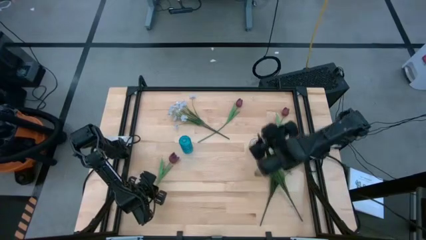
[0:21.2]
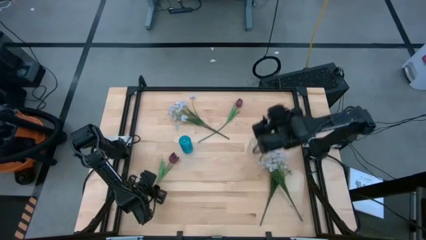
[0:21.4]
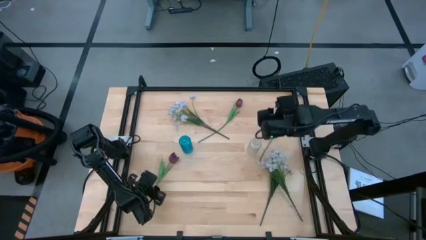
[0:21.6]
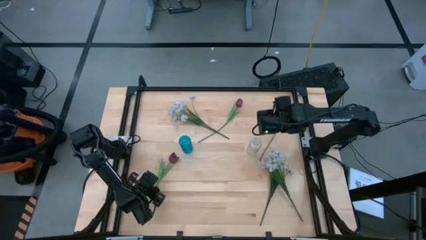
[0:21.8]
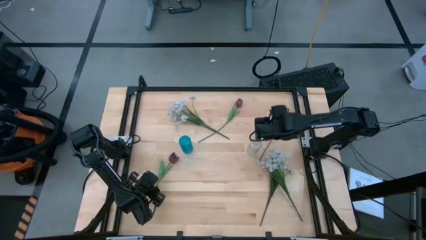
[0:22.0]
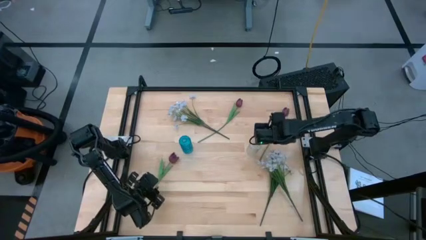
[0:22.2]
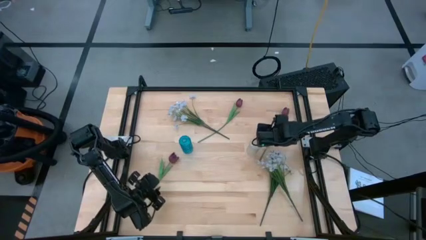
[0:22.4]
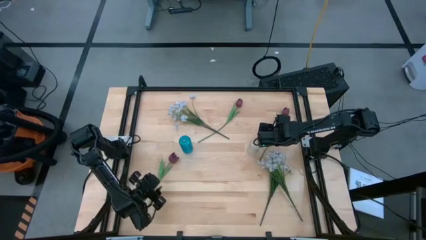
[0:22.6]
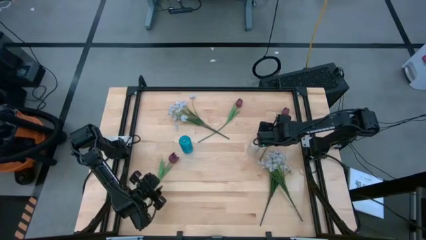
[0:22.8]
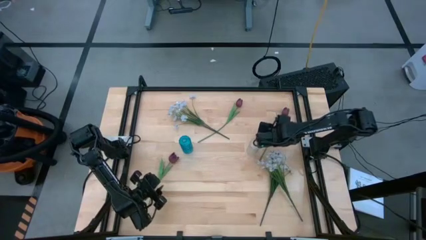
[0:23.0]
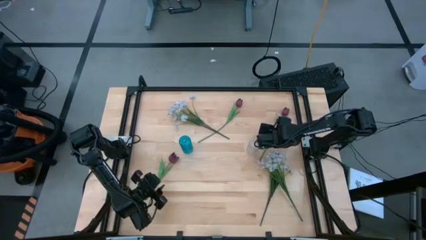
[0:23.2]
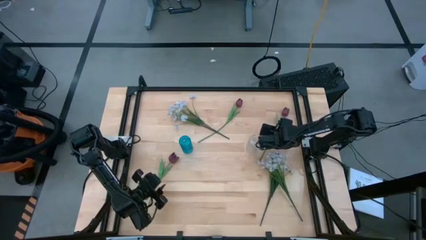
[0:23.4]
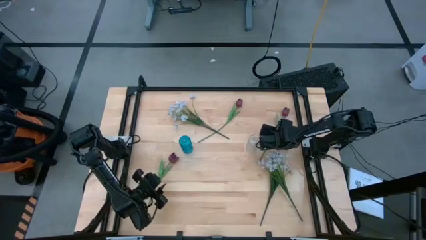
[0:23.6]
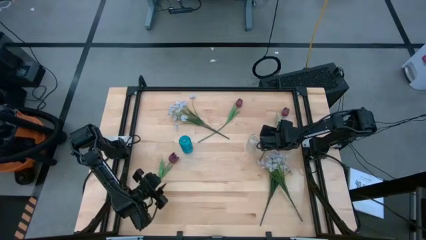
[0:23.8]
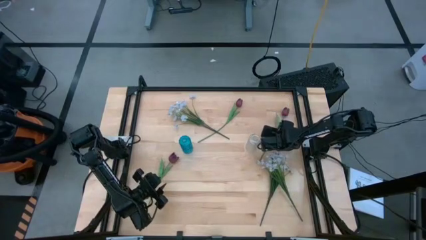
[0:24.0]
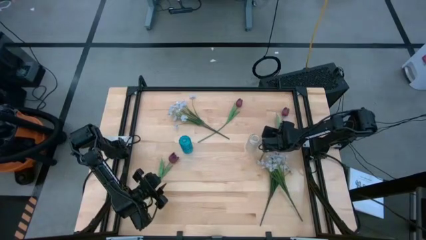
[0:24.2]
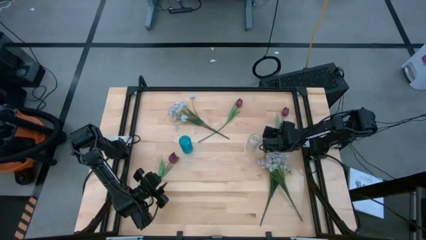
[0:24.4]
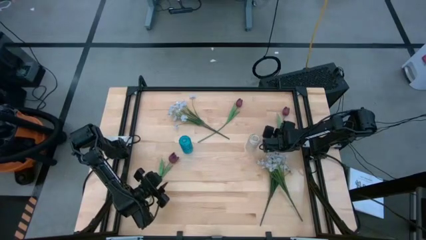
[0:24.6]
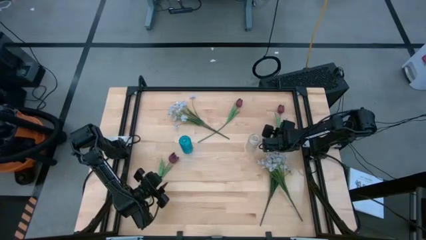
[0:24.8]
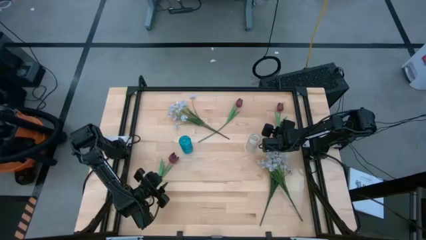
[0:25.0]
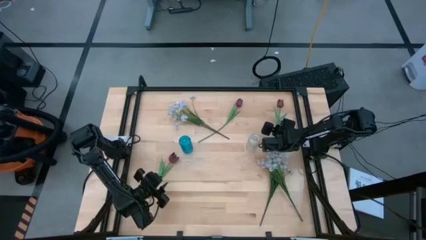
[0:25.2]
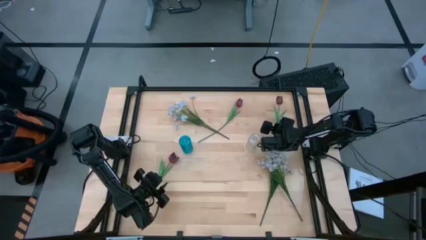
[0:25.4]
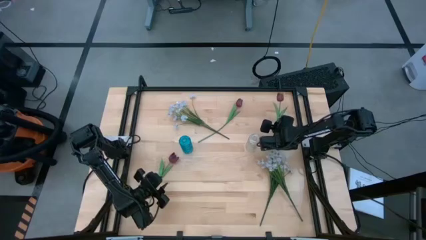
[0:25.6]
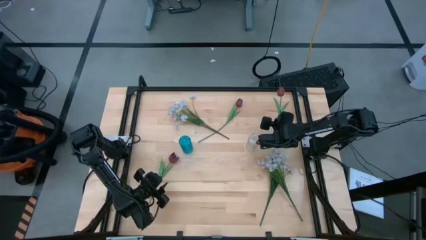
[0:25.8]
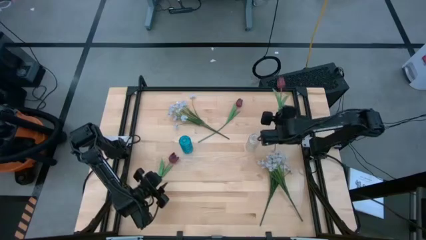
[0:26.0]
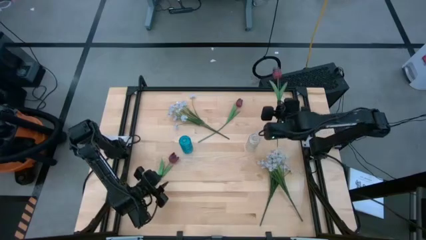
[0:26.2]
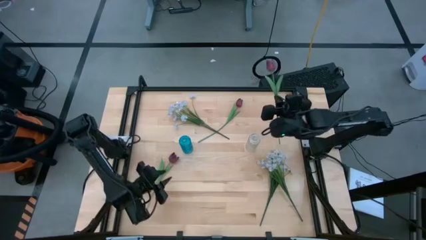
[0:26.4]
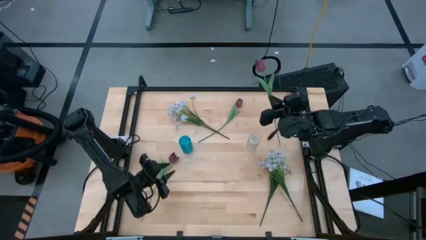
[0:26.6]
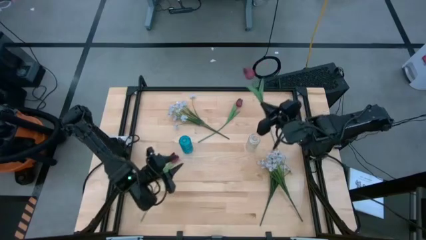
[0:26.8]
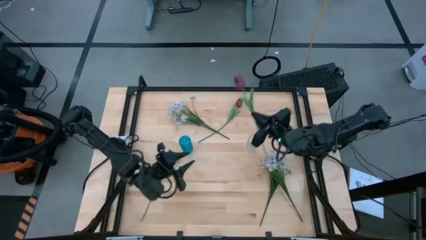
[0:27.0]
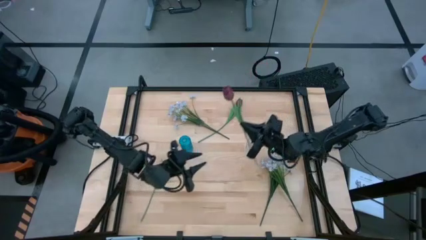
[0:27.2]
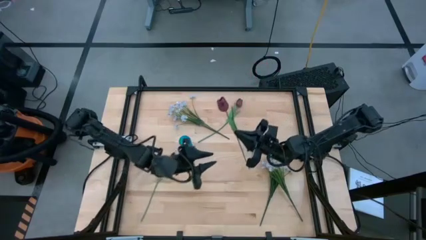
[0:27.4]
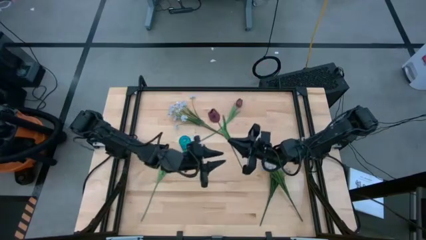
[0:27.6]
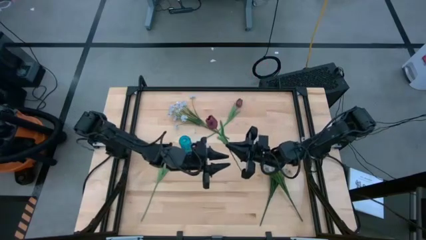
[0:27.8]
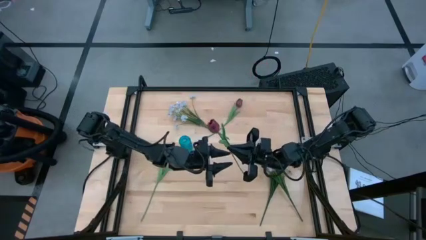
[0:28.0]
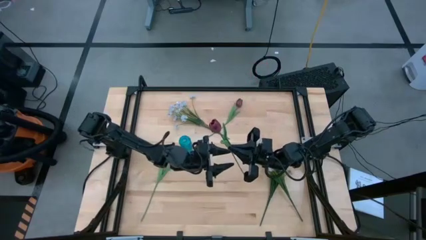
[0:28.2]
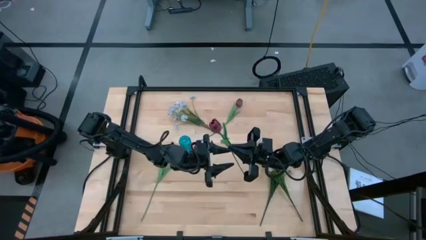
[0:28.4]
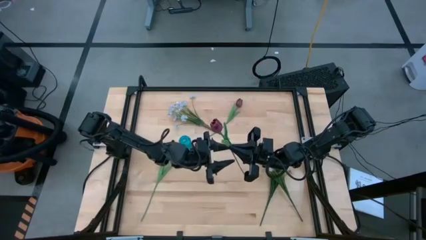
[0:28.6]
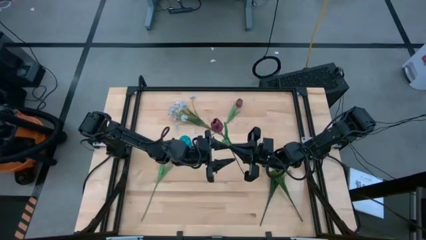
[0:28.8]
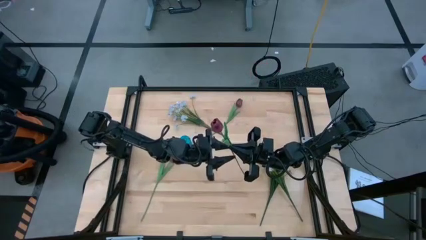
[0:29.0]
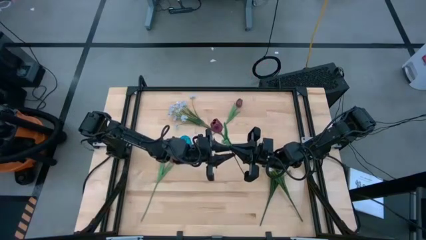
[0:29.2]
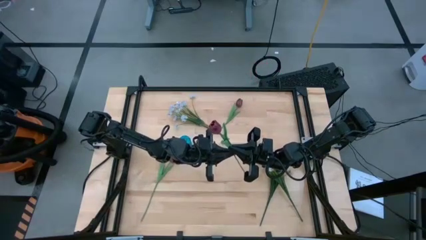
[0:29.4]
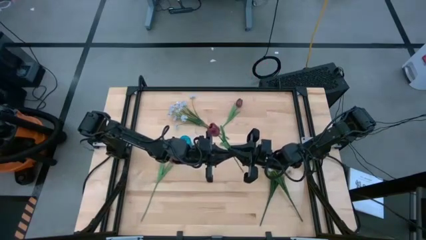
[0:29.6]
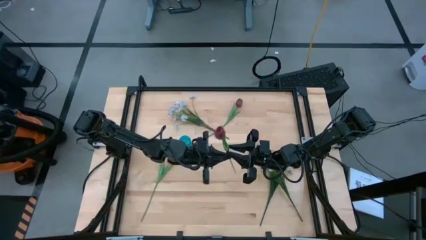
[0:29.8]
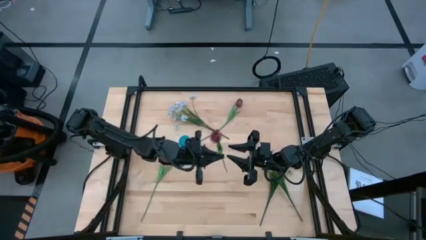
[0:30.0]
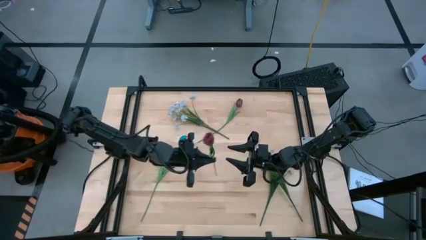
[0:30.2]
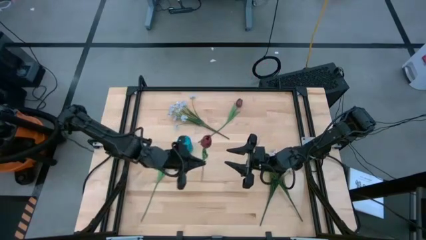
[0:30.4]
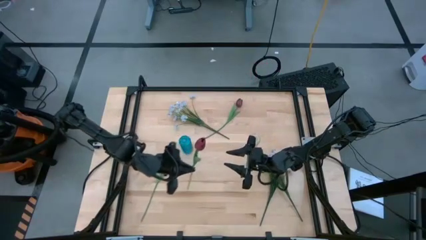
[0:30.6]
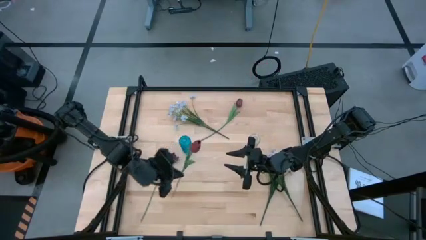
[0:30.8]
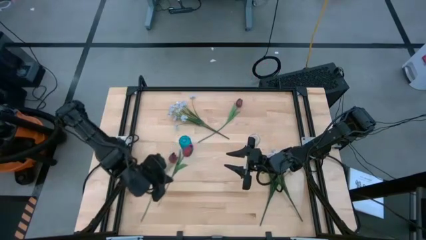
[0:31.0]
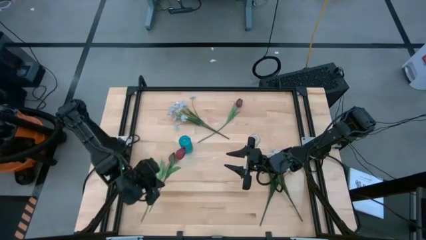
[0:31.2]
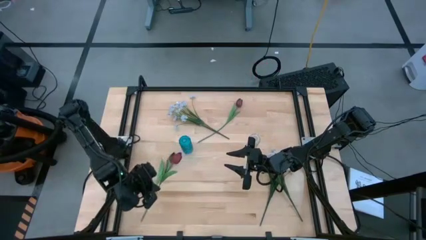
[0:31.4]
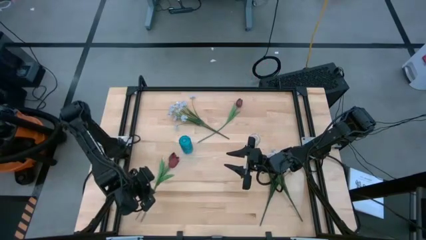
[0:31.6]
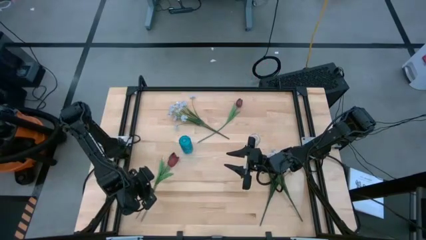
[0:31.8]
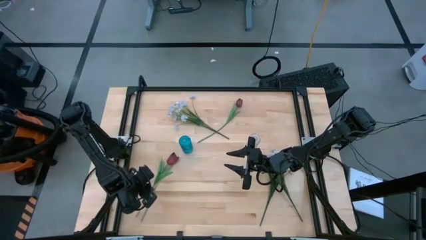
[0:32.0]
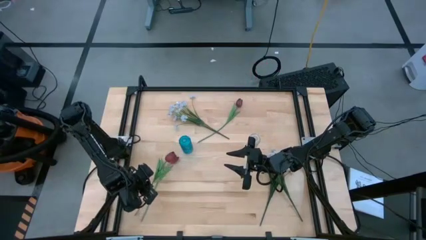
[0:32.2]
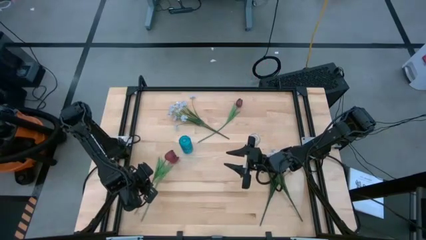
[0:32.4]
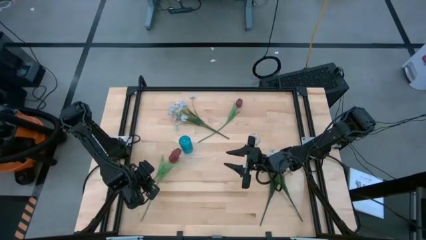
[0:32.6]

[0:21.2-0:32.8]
Task: Sort flowers into vase by color
Move the right red tulip to the bottom left of the table
